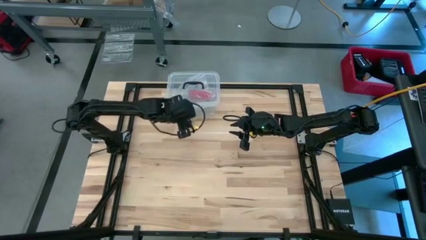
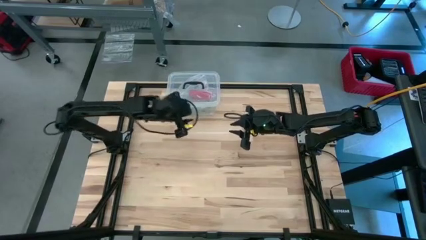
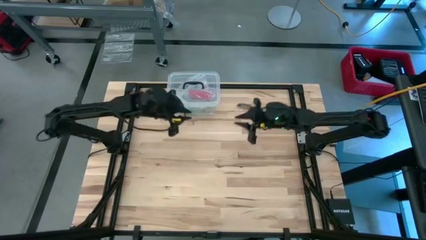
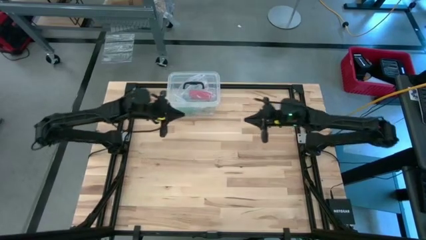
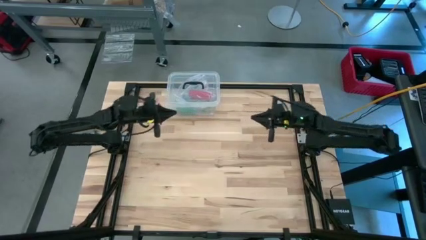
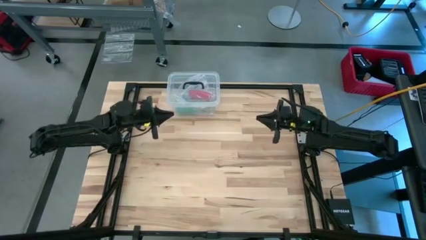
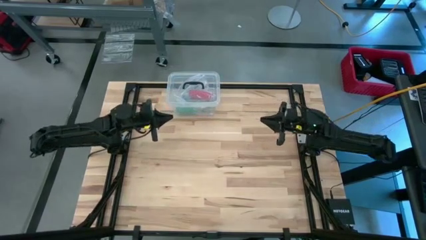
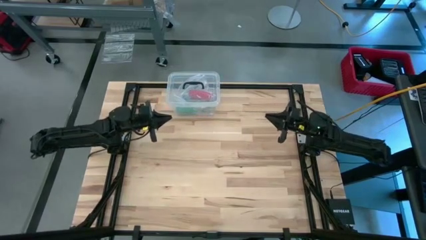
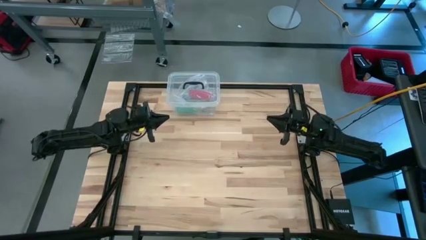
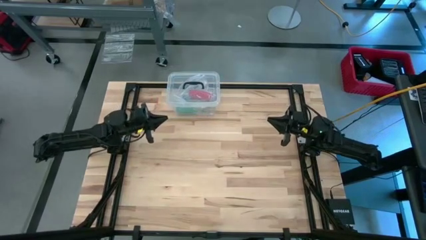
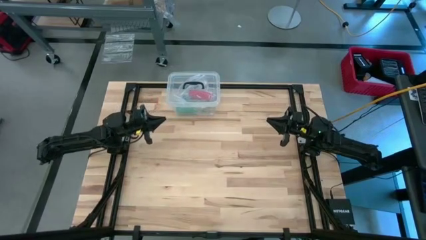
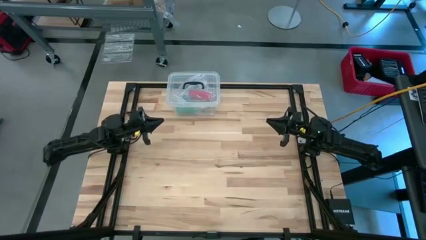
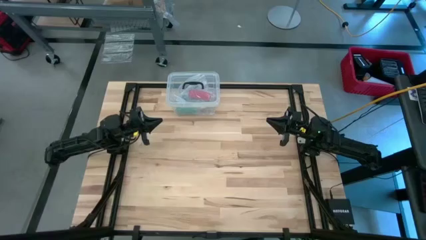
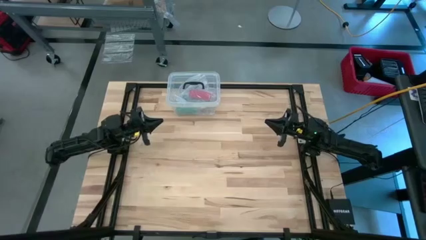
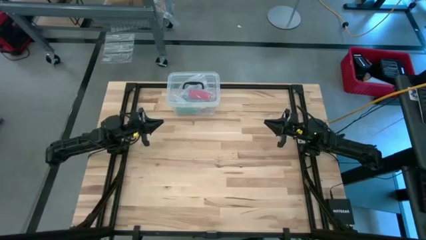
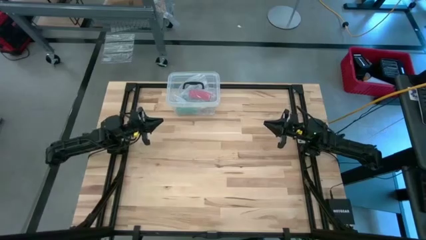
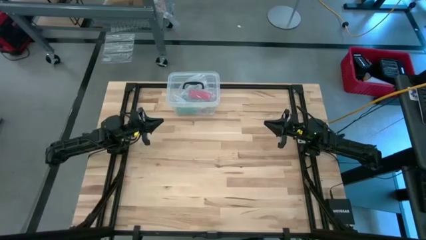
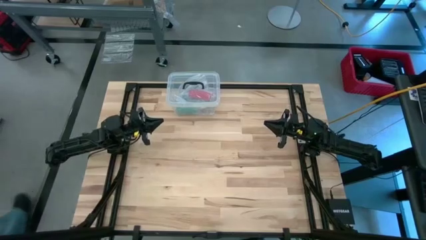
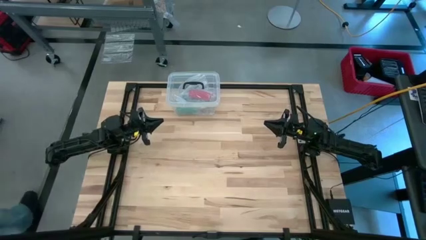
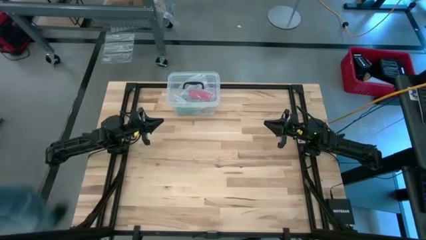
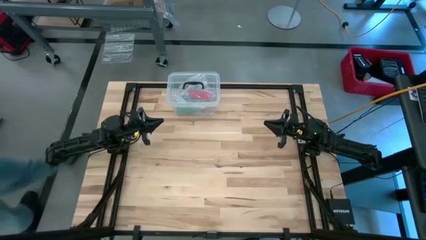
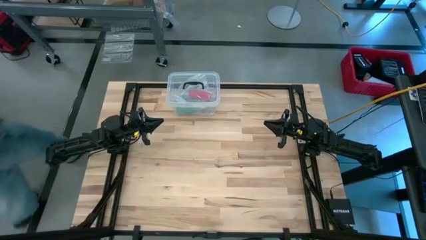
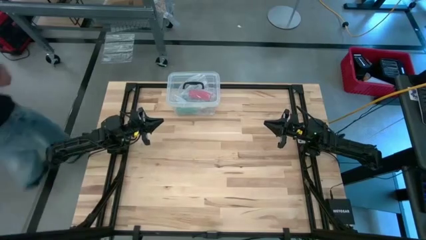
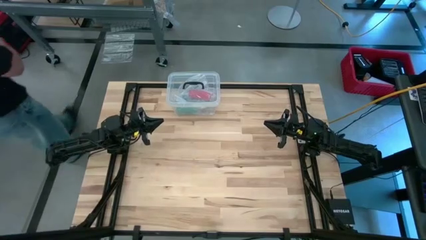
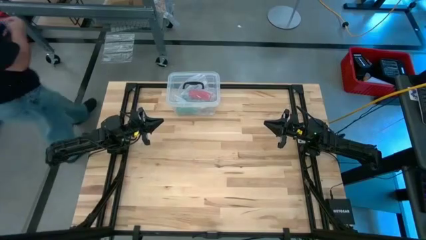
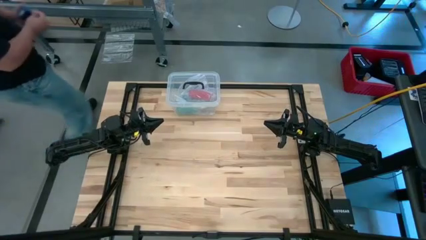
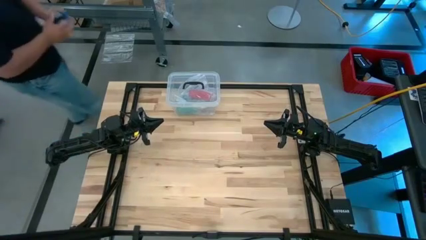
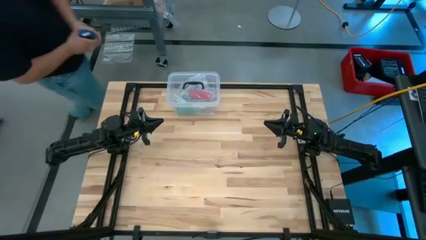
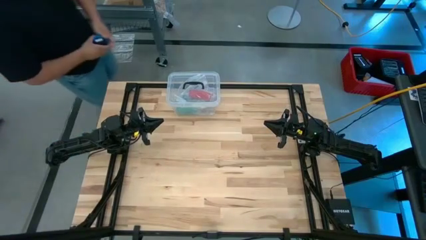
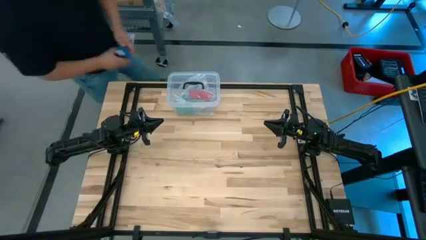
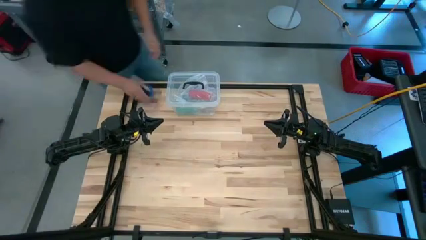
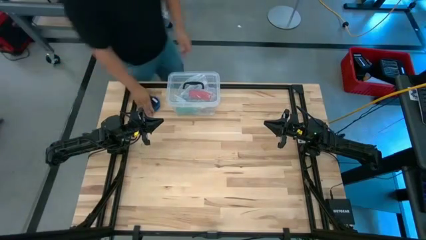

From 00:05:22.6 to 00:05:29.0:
Task: Roll bandage
Return to Home Position

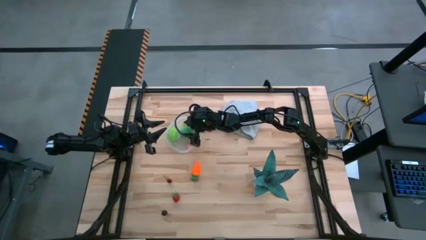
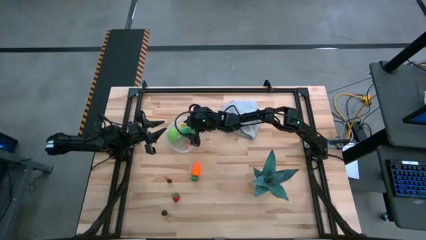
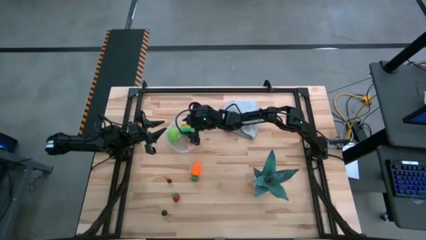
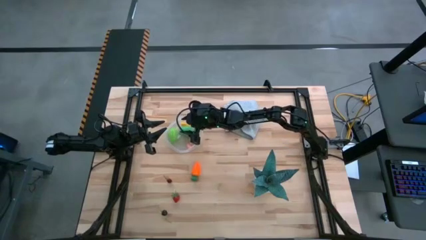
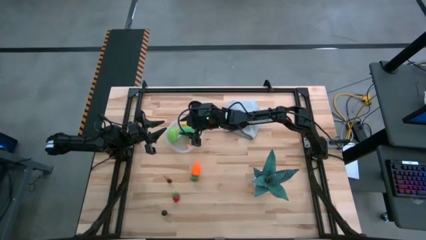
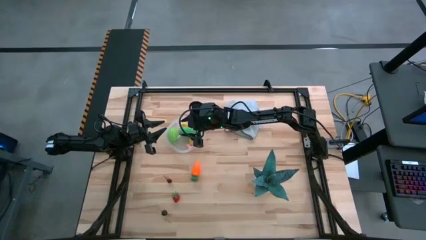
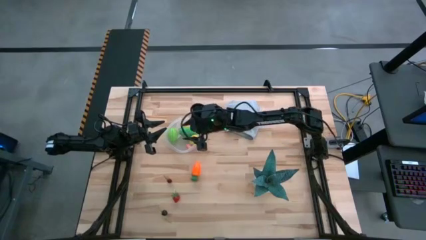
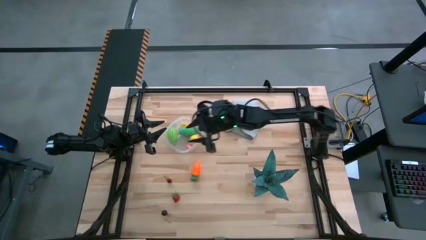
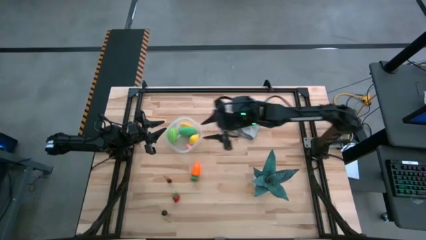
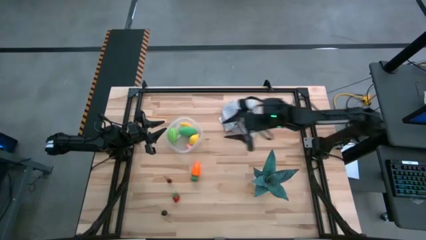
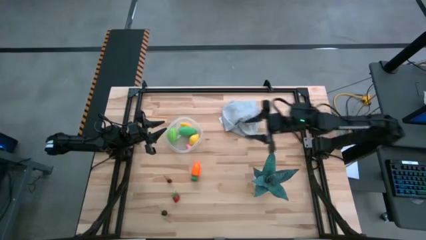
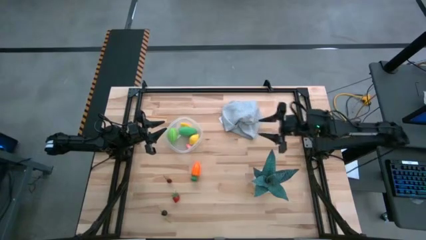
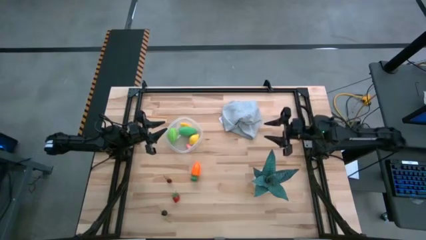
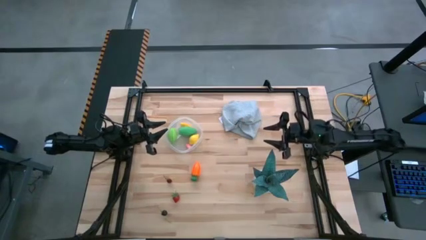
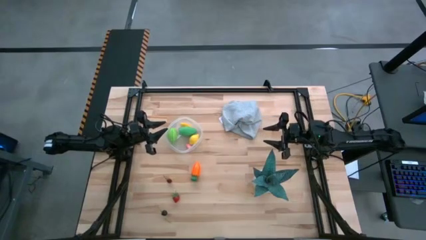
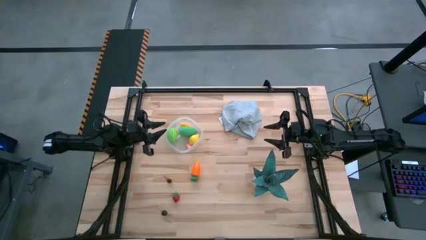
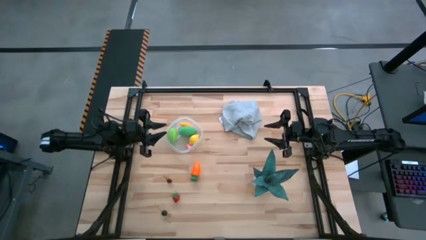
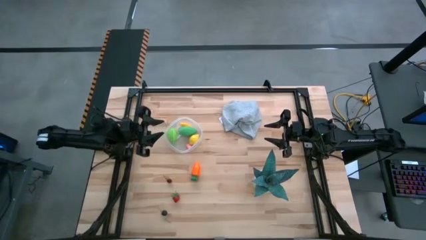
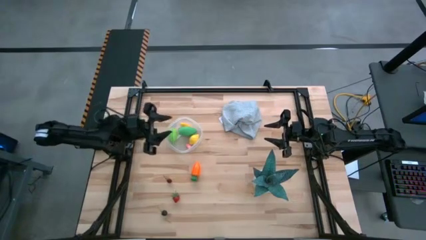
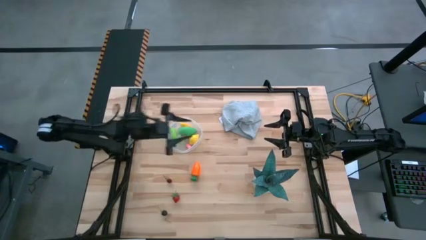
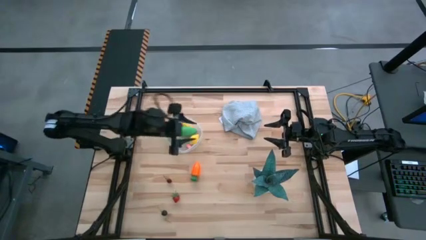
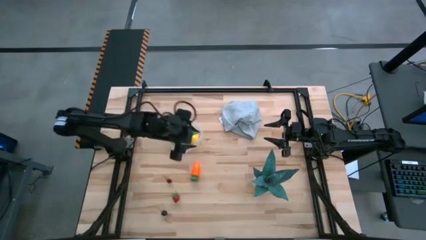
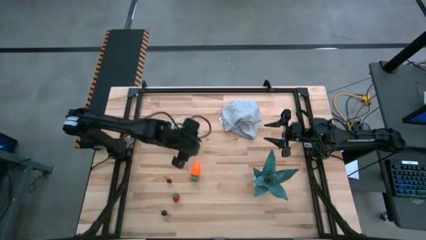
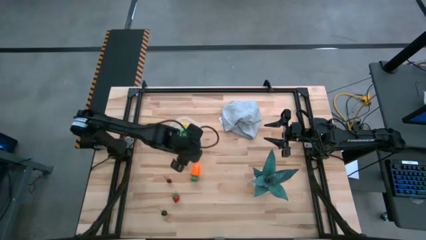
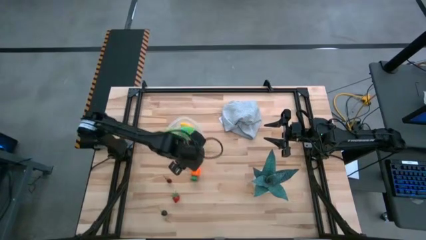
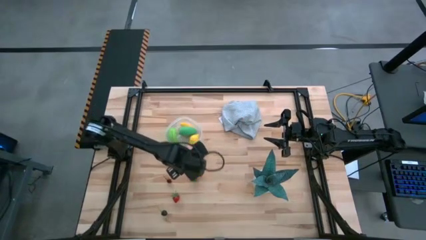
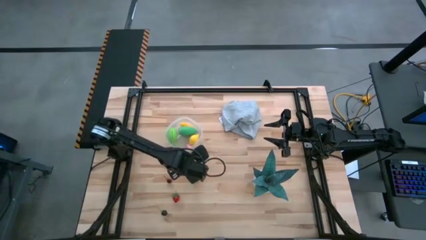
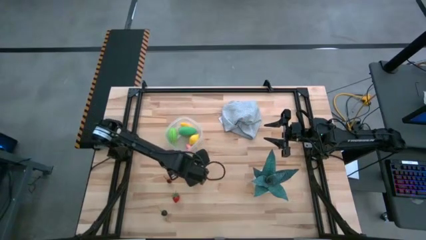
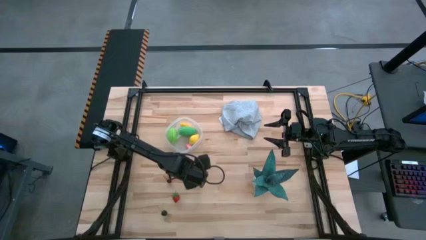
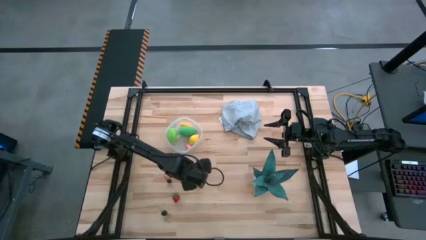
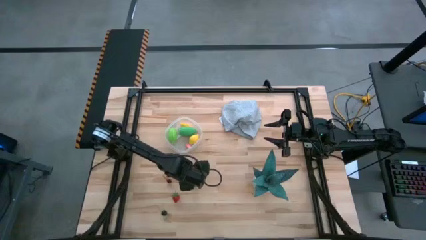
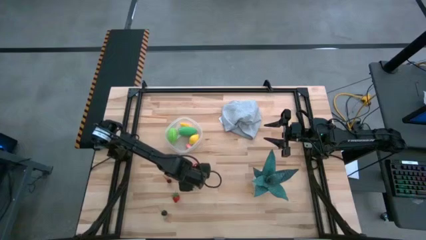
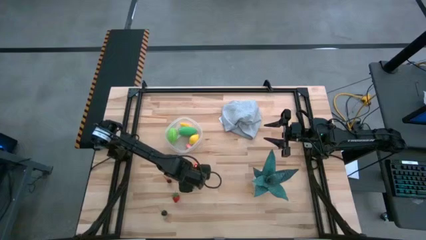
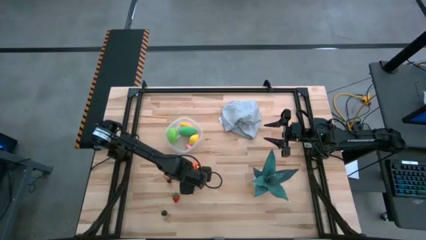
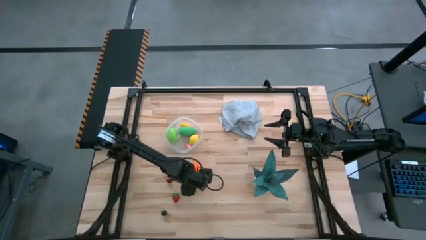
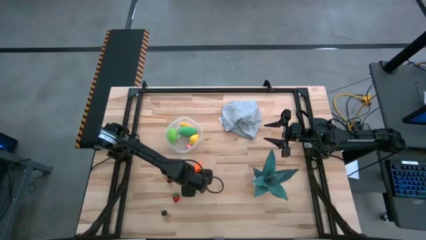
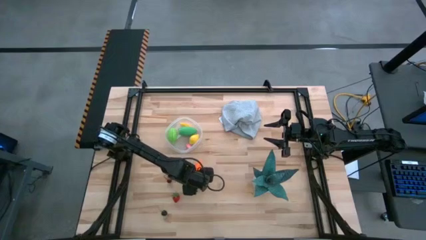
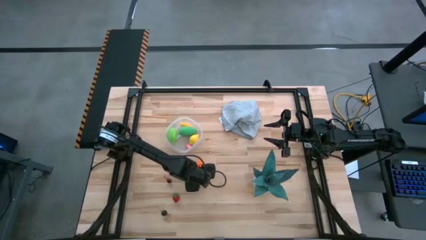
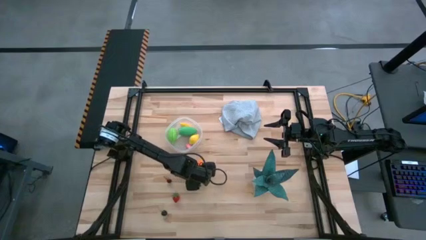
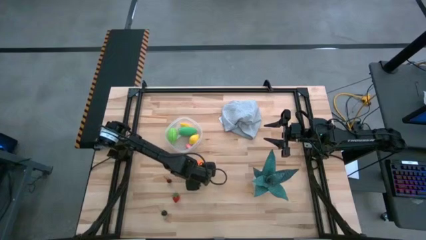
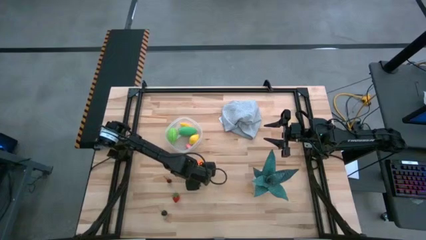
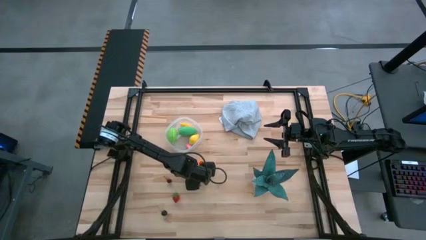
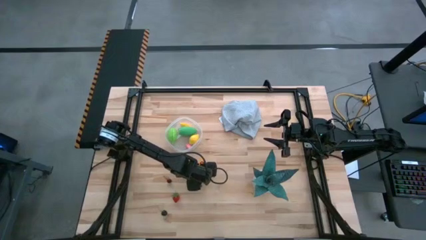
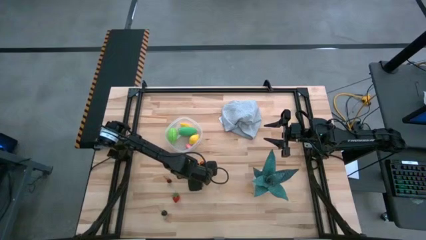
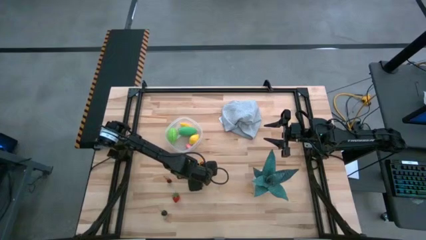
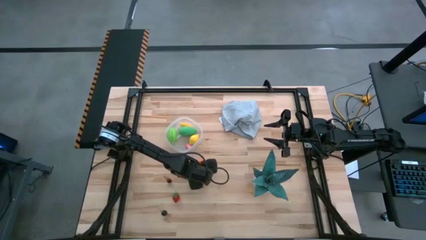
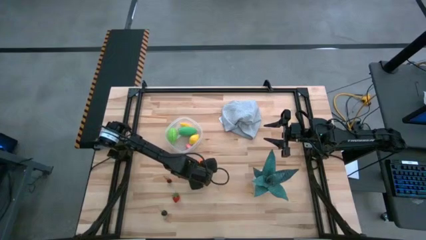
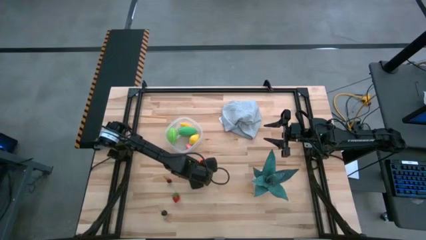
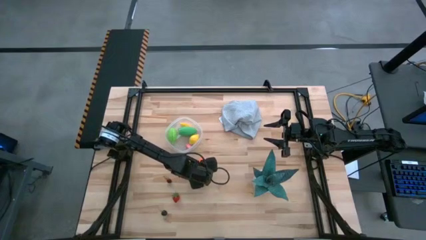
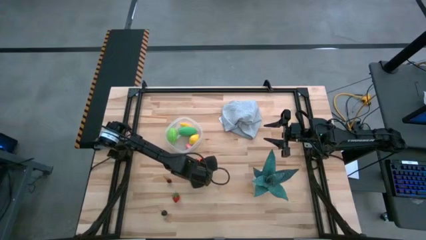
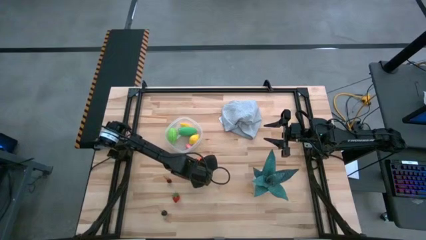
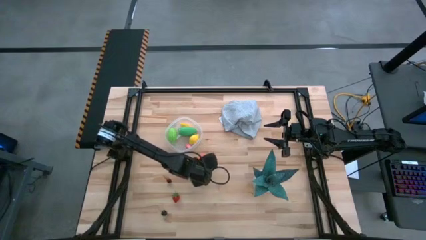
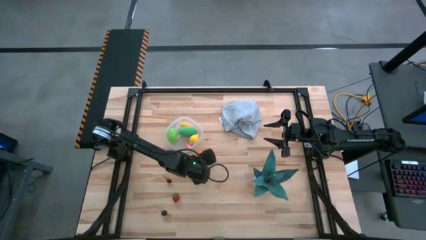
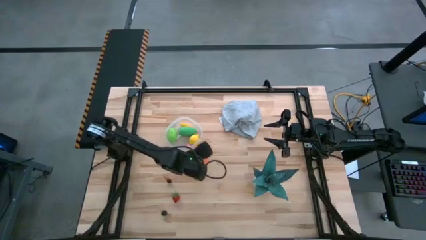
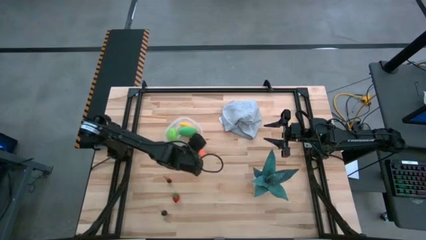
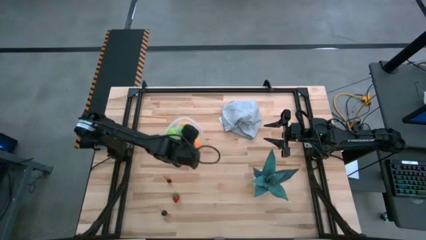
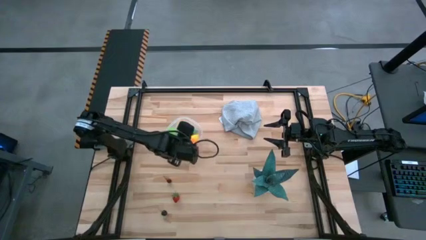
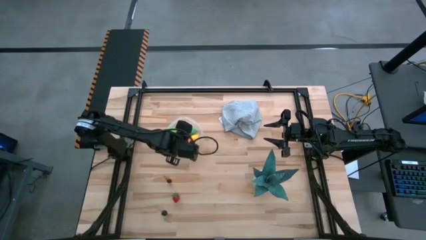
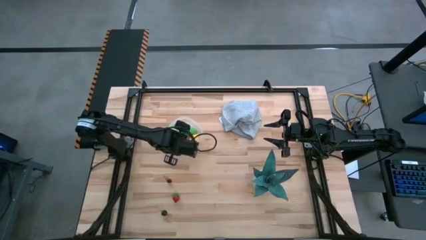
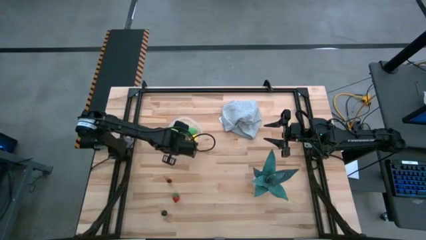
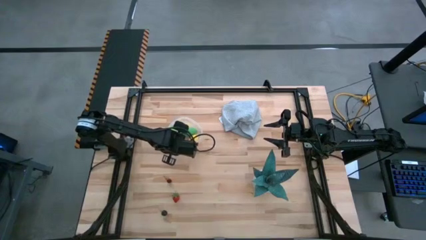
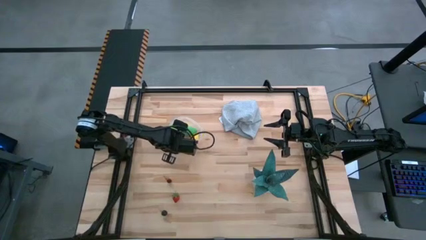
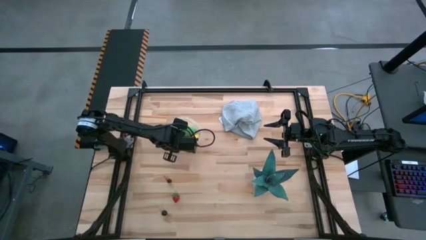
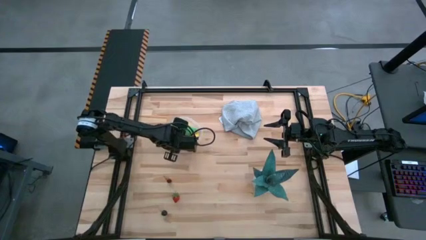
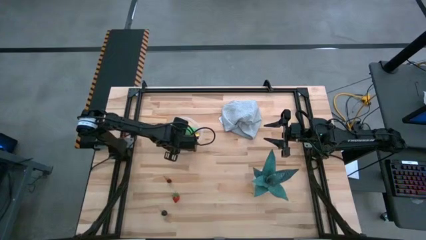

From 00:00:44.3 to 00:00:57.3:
Task: Pick and placing Produce into tupperware
Put the orange carrot into the transparent container
